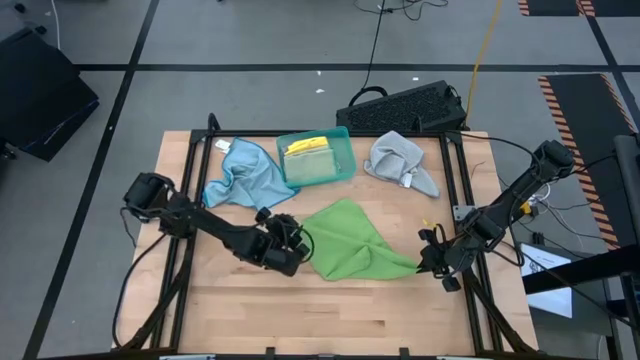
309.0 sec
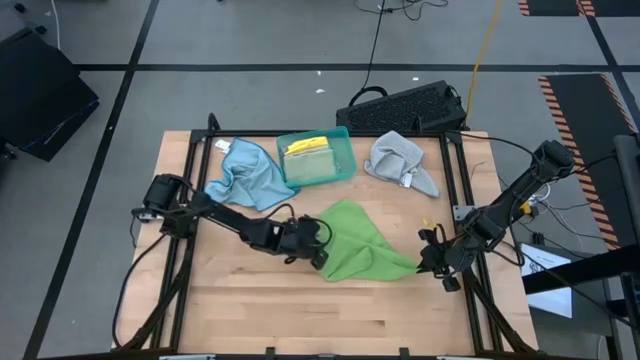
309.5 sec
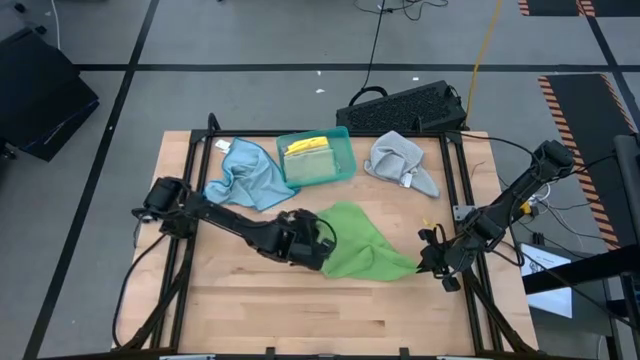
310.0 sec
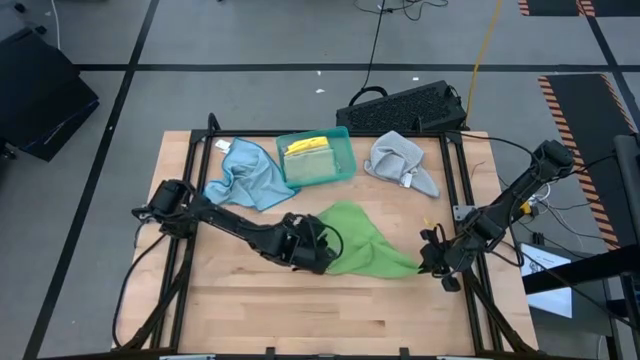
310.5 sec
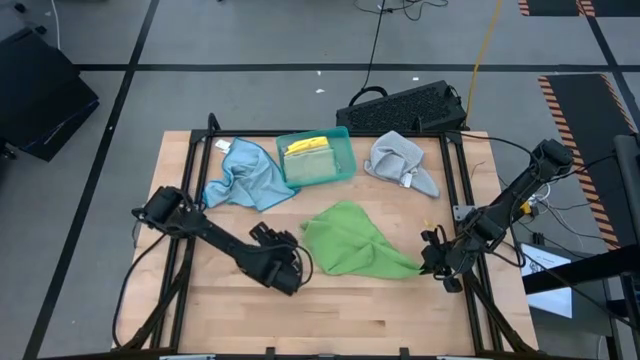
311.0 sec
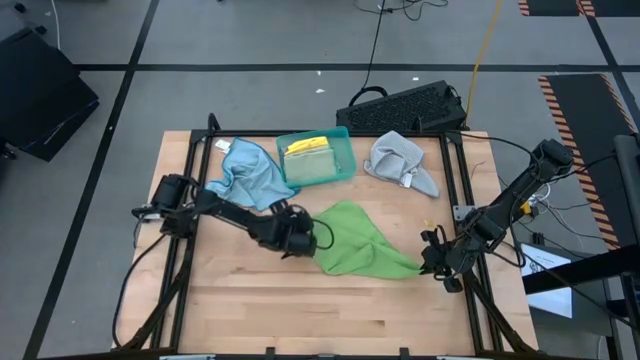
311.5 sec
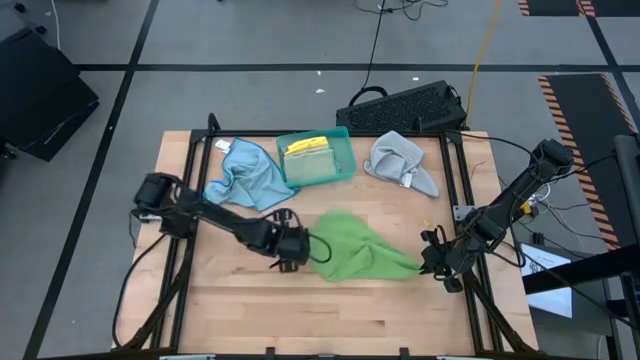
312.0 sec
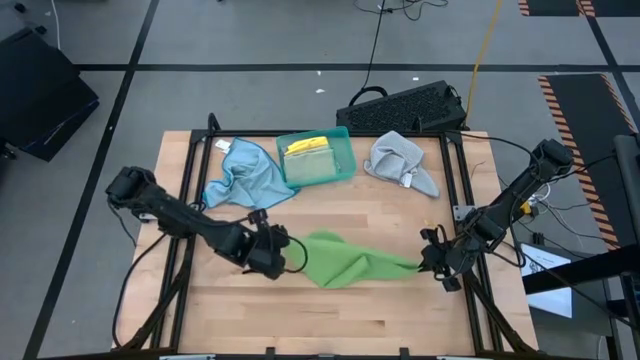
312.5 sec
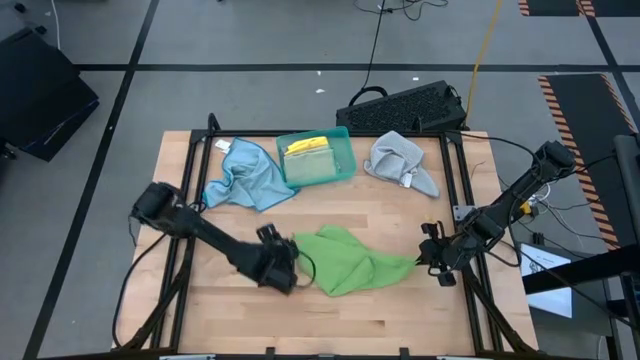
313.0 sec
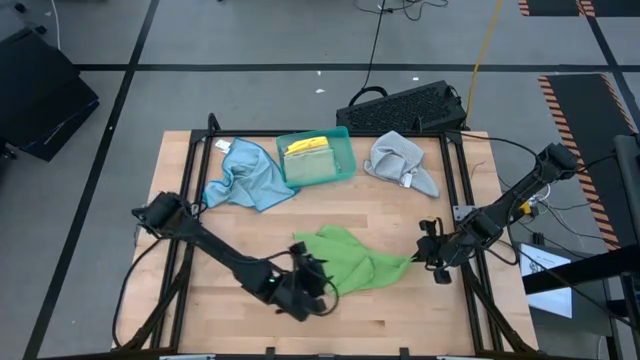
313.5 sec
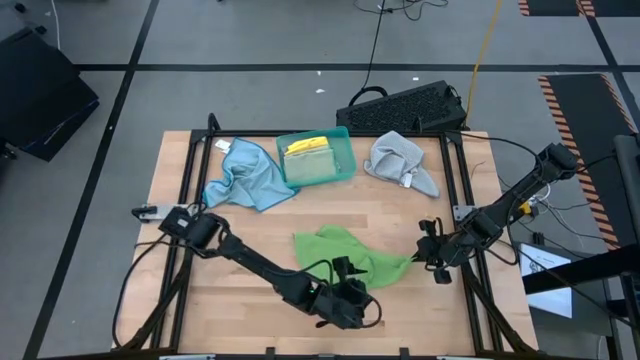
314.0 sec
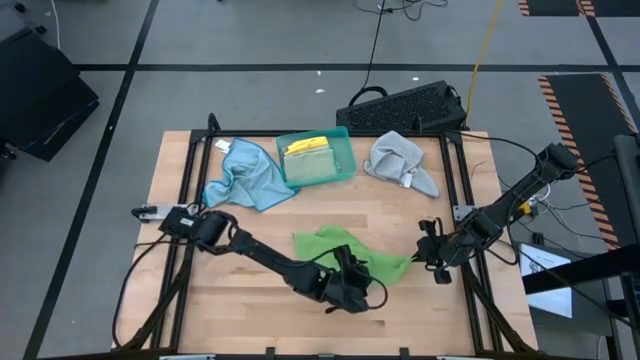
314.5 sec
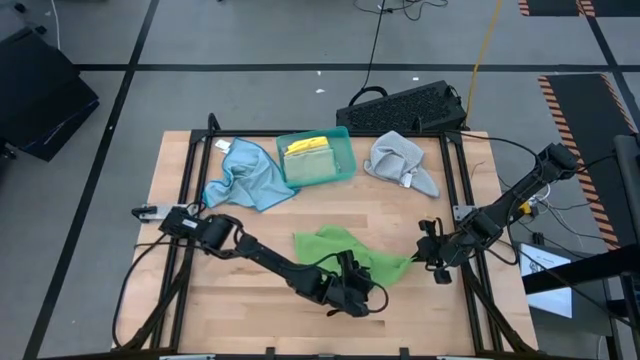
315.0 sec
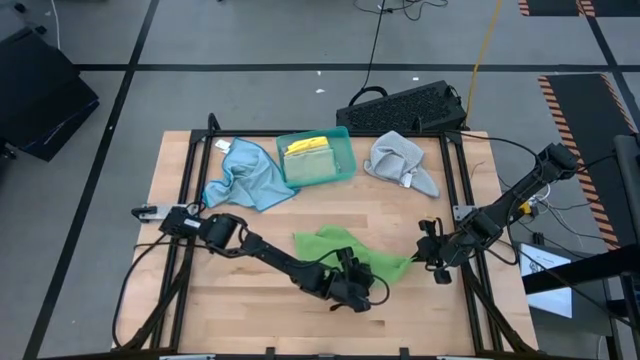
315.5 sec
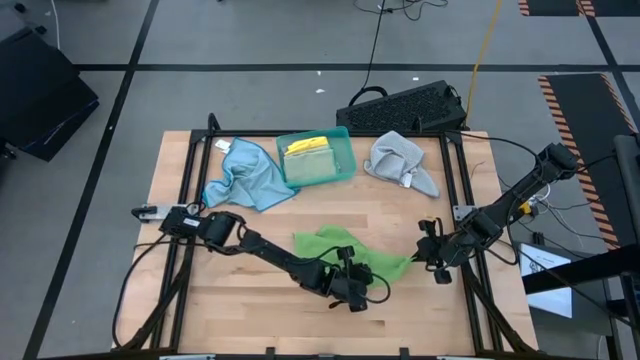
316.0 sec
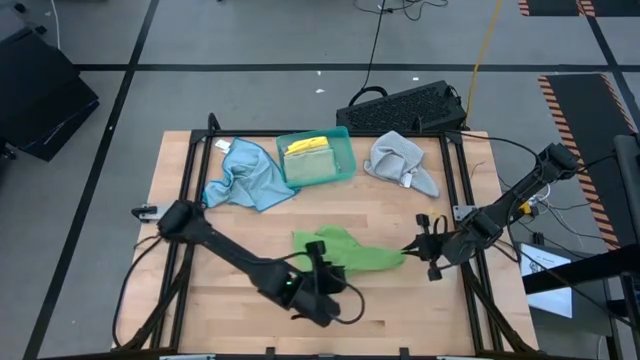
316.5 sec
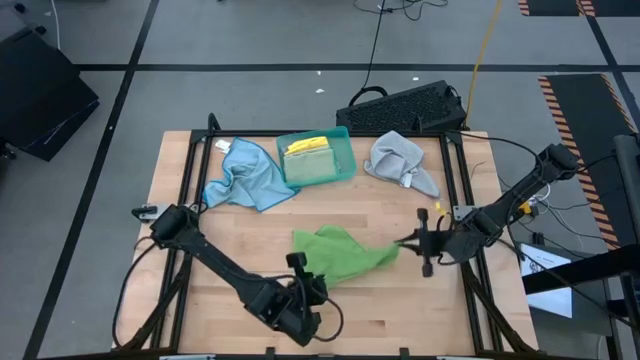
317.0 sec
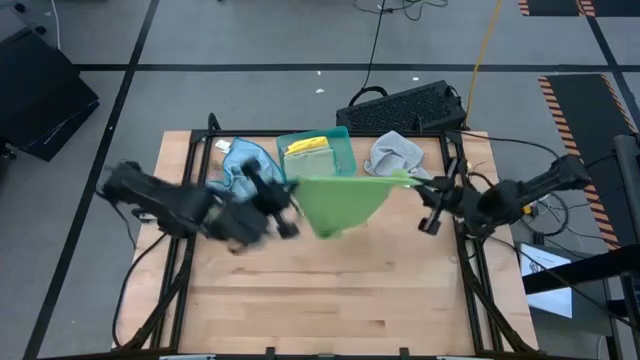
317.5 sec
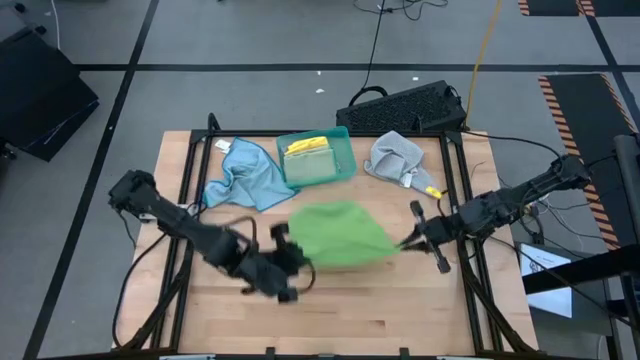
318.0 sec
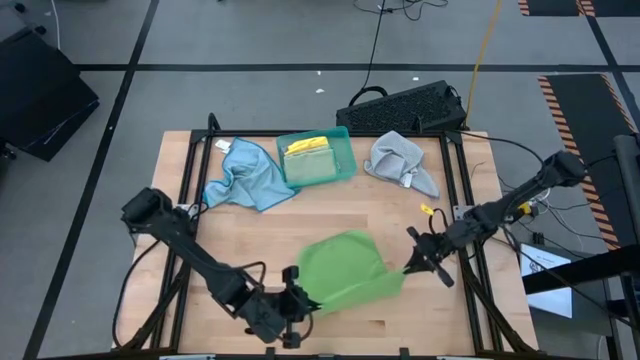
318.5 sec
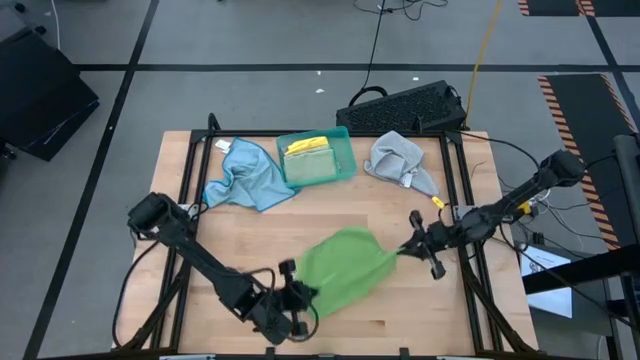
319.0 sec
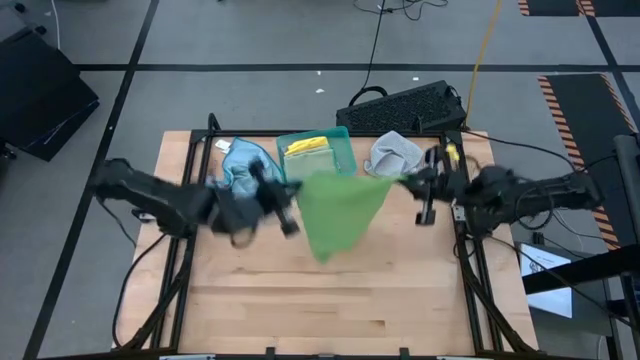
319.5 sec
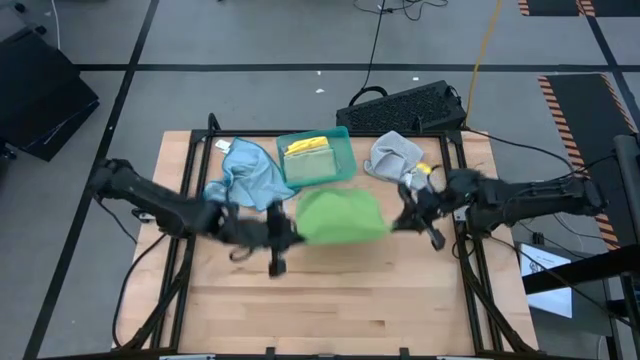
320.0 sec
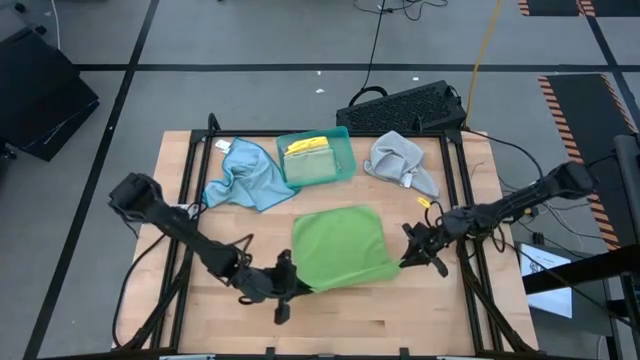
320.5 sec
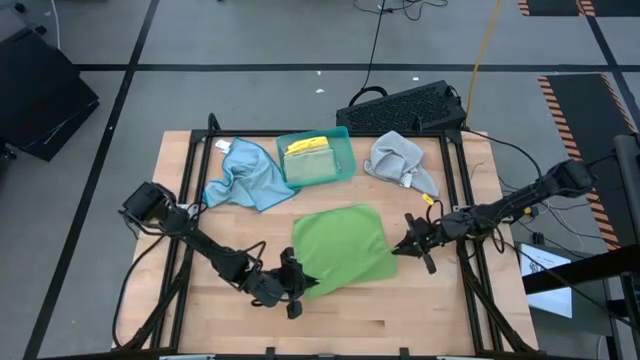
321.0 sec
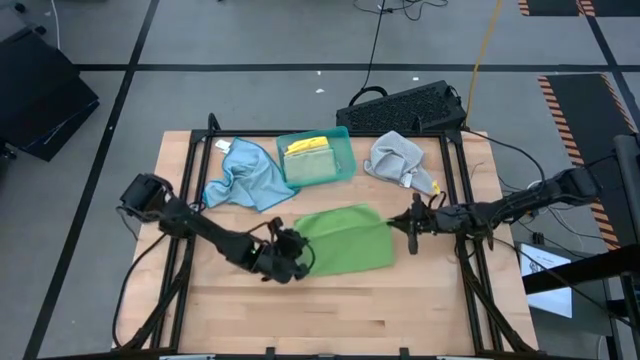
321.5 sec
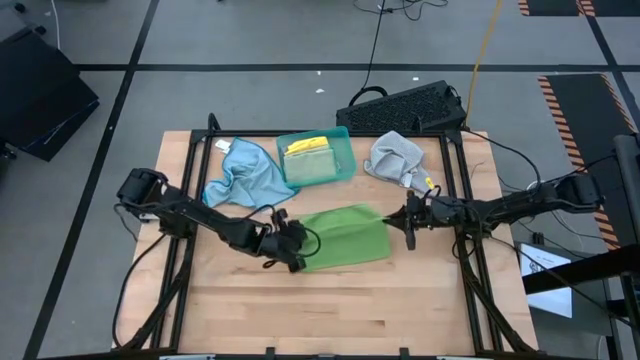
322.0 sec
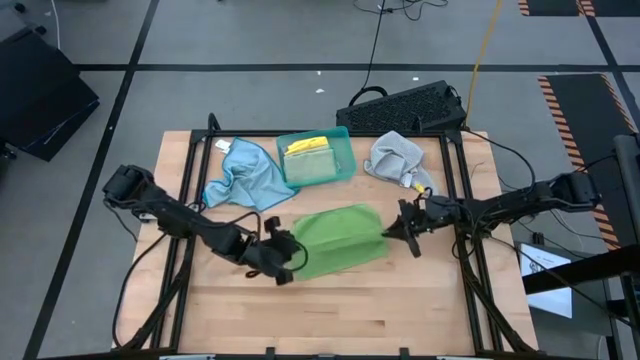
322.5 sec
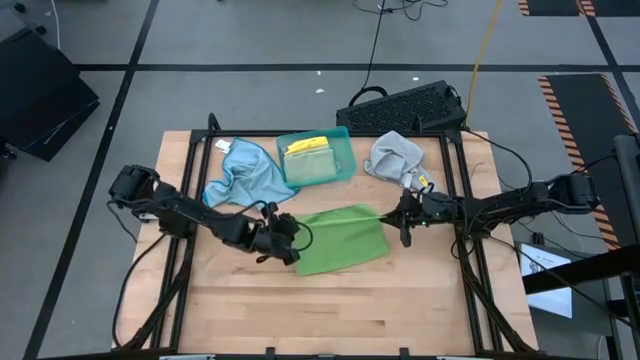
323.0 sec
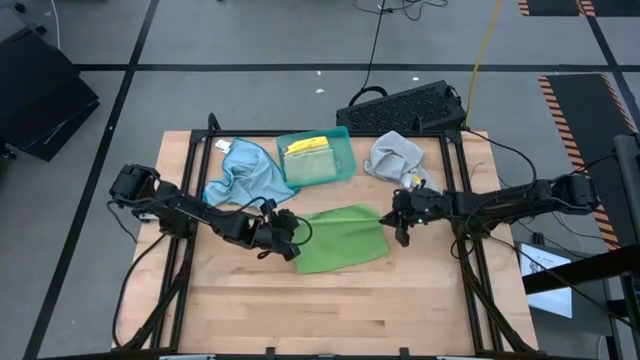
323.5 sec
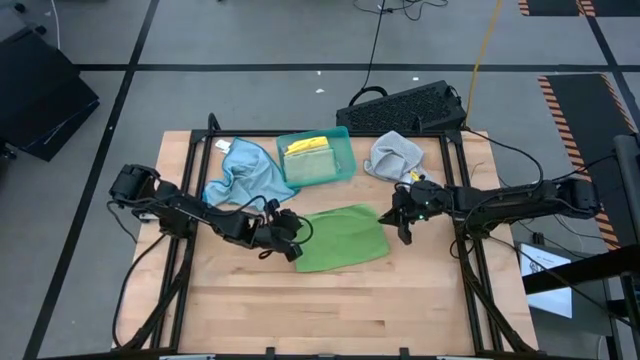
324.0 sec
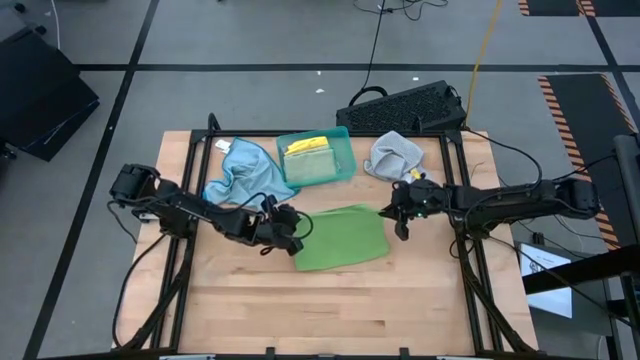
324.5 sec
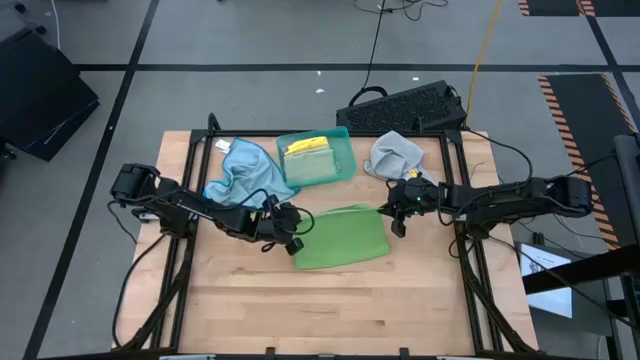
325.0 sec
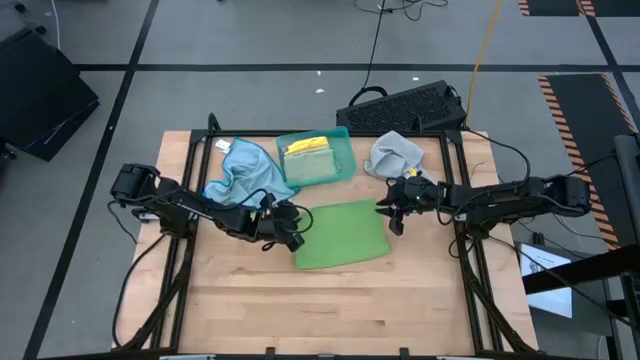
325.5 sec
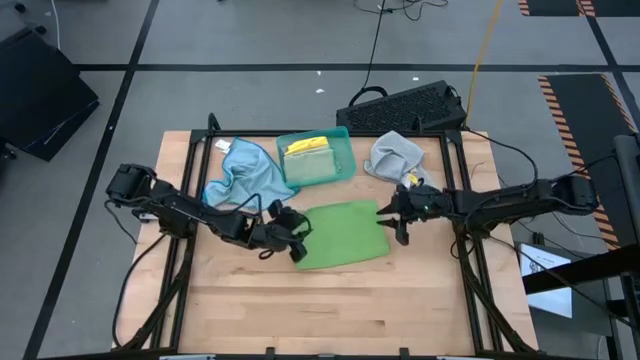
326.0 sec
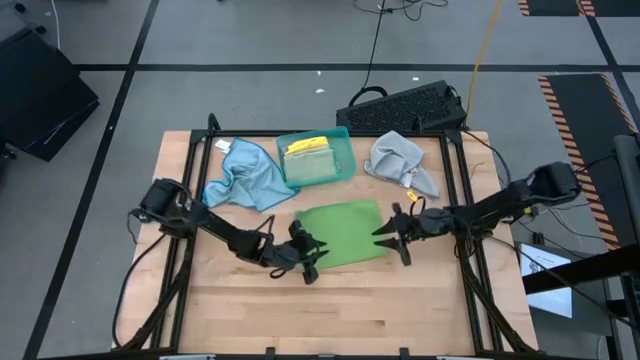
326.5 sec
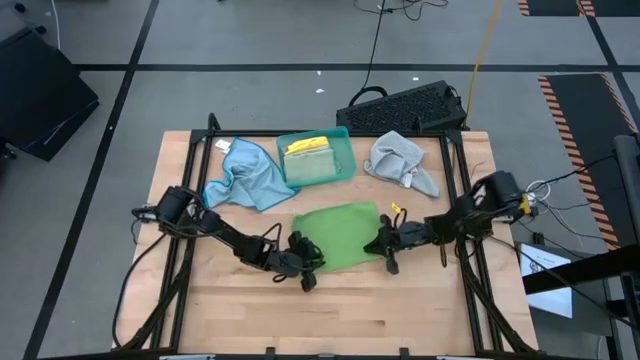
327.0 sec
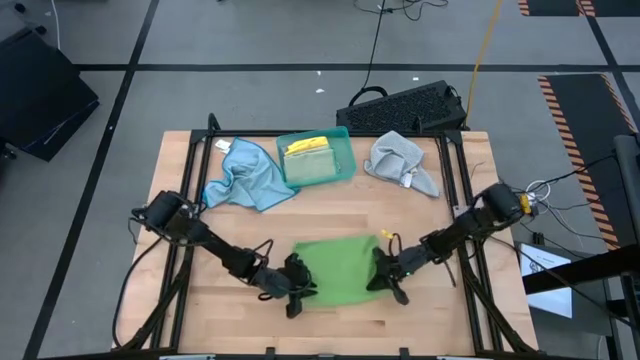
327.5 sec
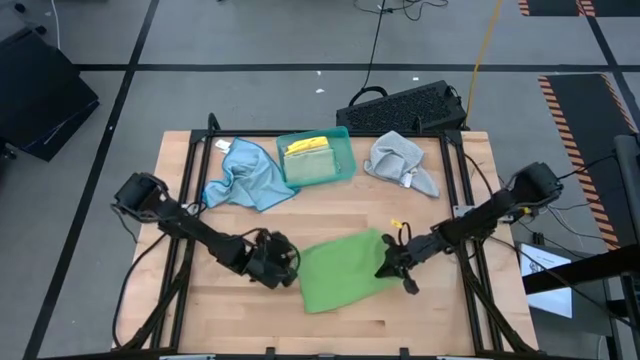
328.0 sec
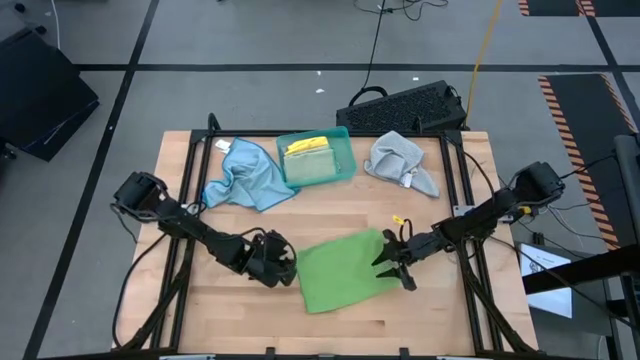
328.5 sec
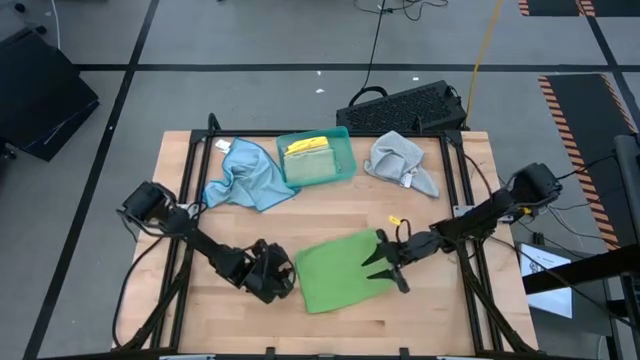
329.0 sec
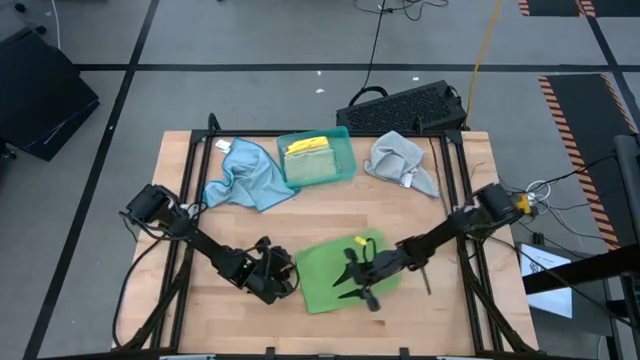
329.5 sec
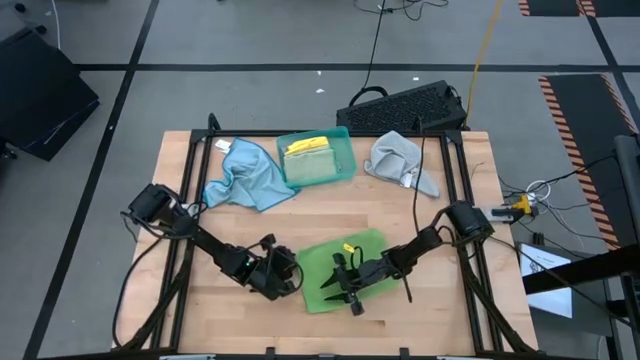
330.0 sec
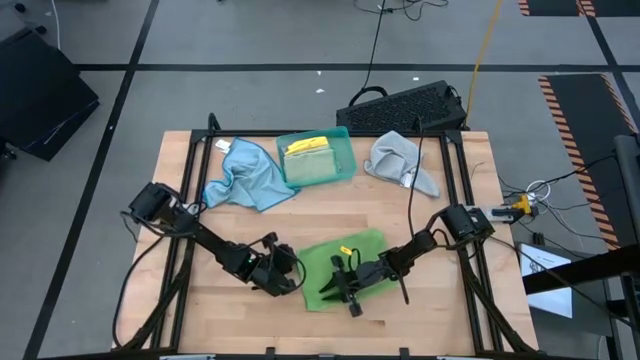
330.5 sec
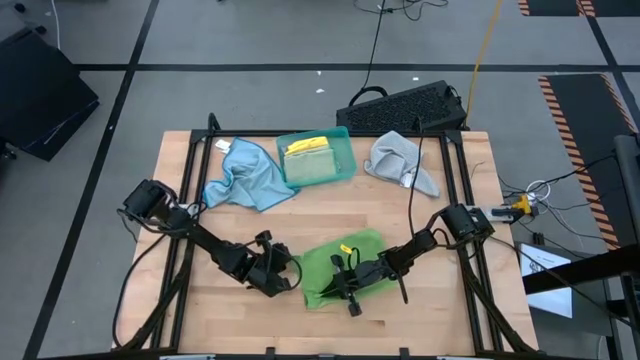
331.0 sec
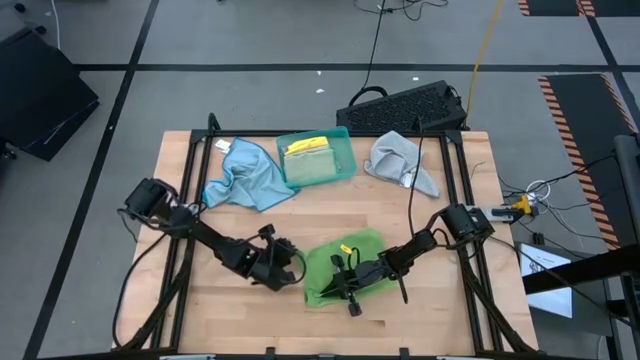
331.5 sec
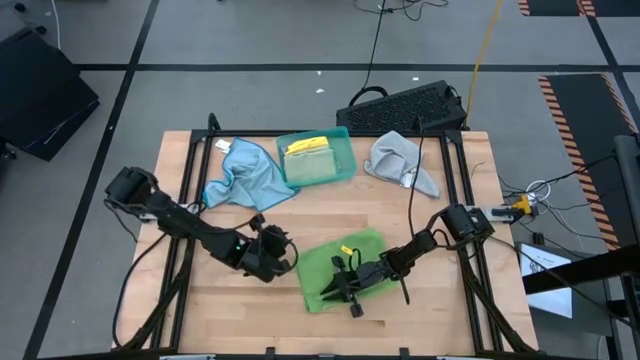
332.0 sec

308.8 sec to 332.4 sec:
Task: Fold microfiber towels
Fold the green microfiber cloth
